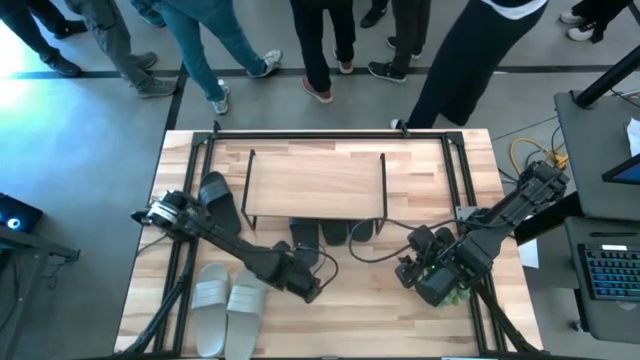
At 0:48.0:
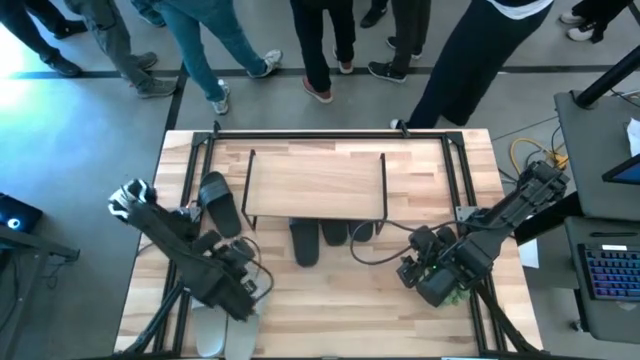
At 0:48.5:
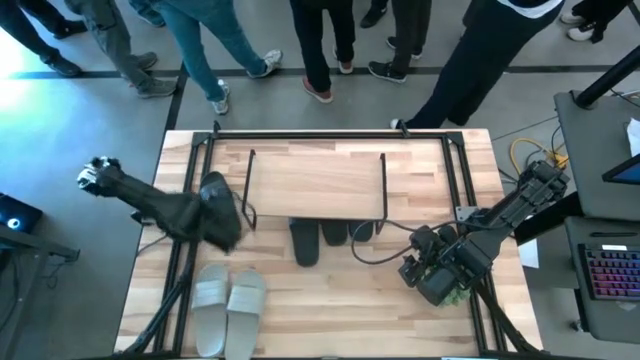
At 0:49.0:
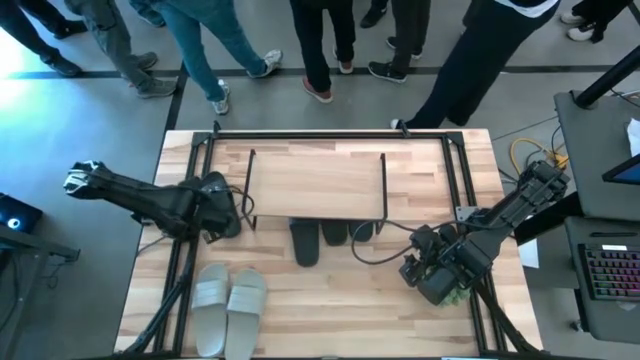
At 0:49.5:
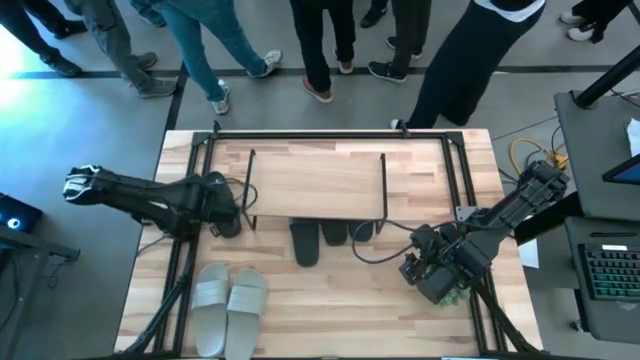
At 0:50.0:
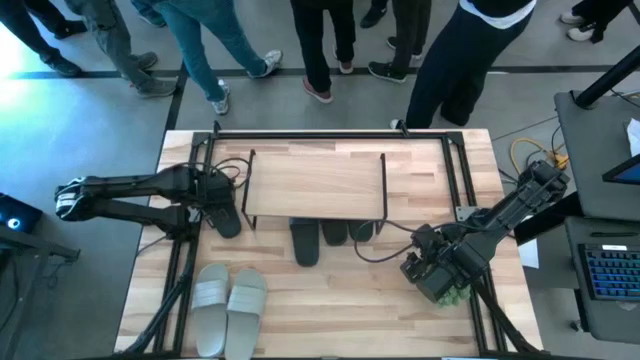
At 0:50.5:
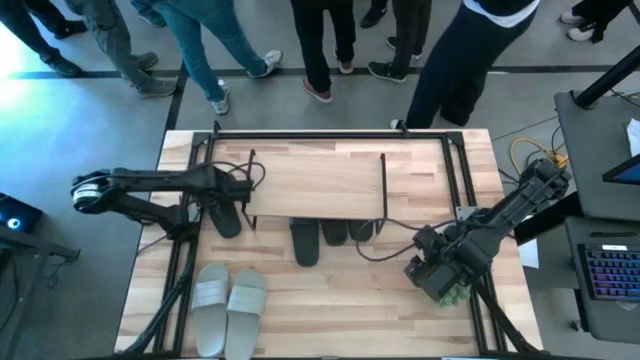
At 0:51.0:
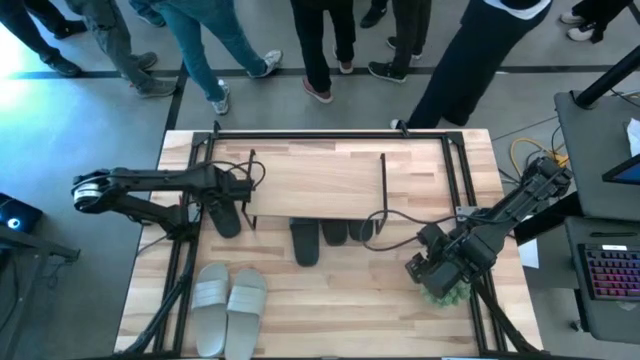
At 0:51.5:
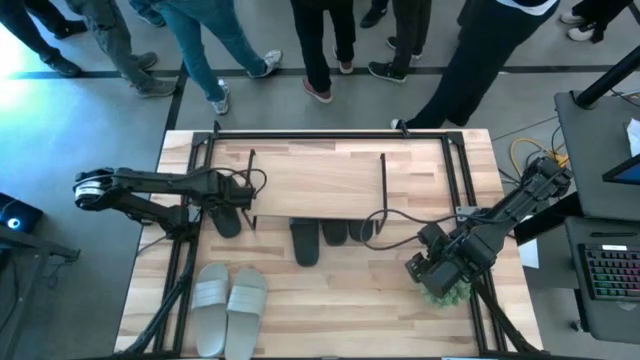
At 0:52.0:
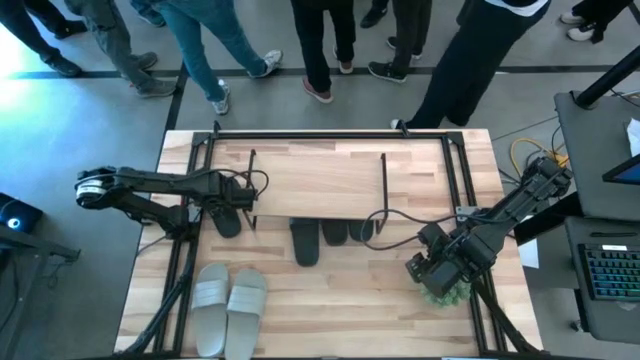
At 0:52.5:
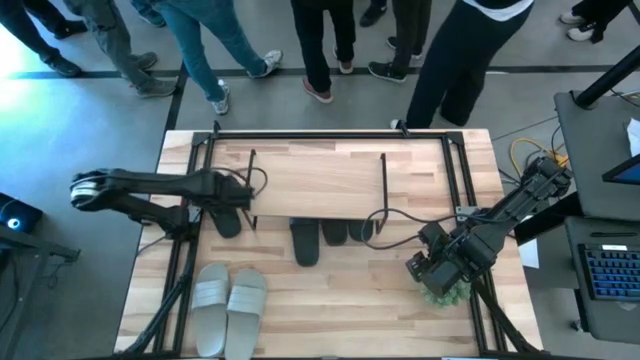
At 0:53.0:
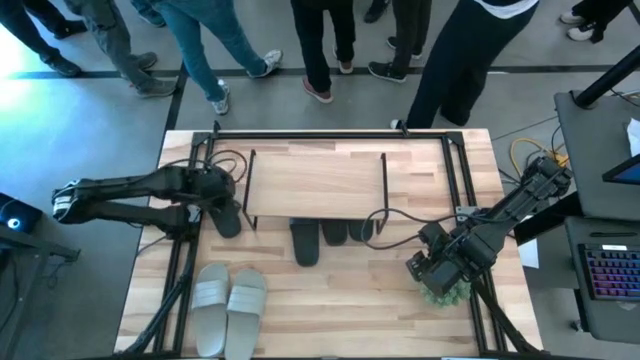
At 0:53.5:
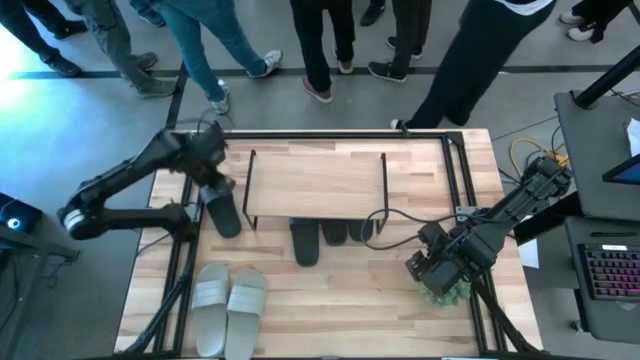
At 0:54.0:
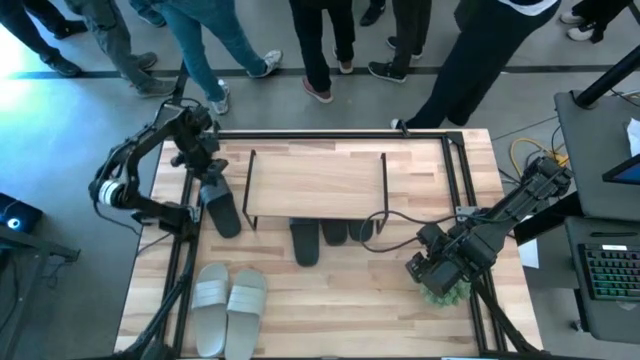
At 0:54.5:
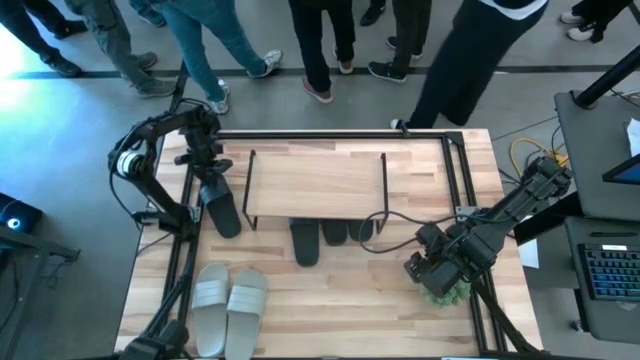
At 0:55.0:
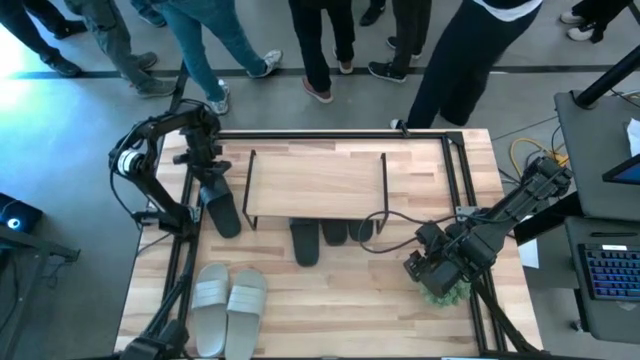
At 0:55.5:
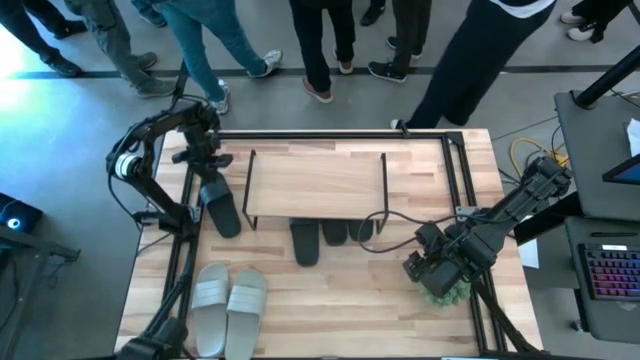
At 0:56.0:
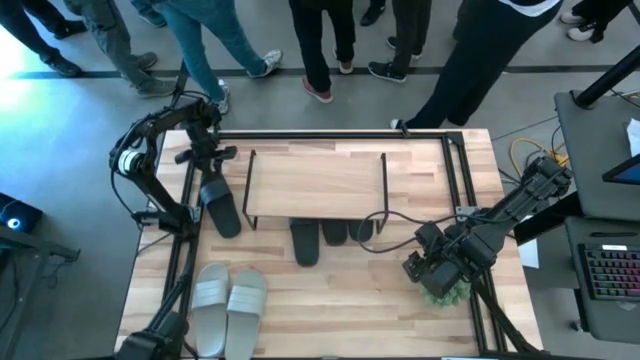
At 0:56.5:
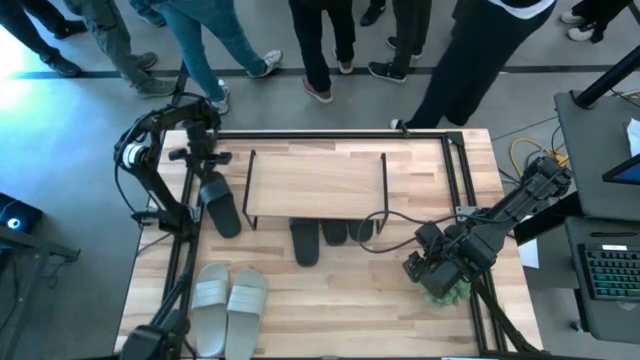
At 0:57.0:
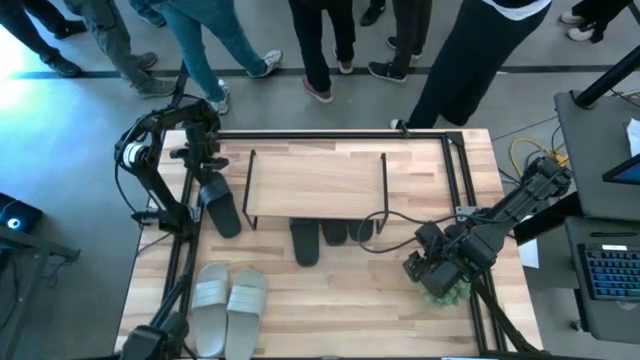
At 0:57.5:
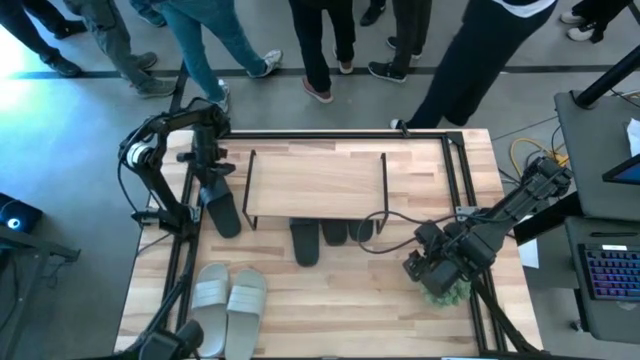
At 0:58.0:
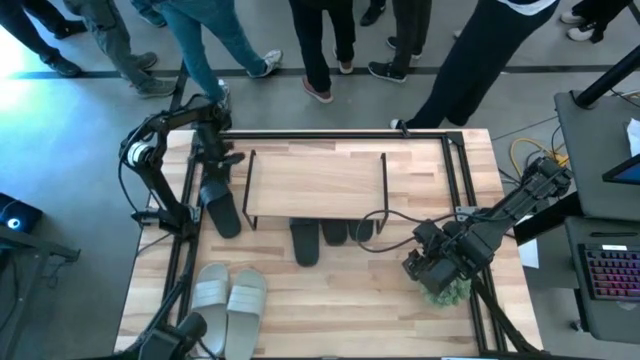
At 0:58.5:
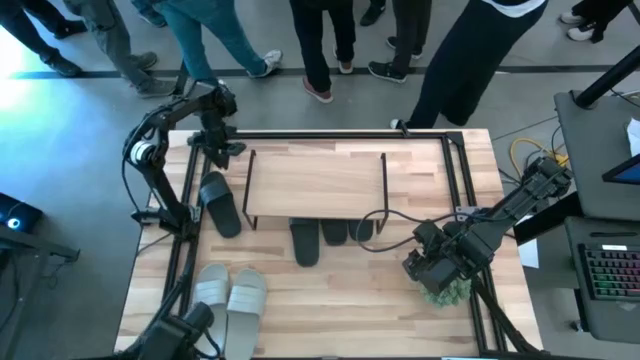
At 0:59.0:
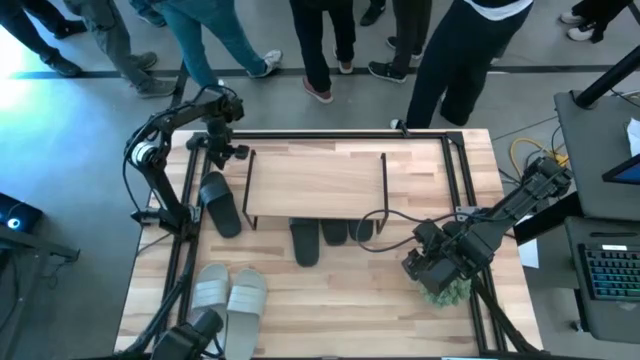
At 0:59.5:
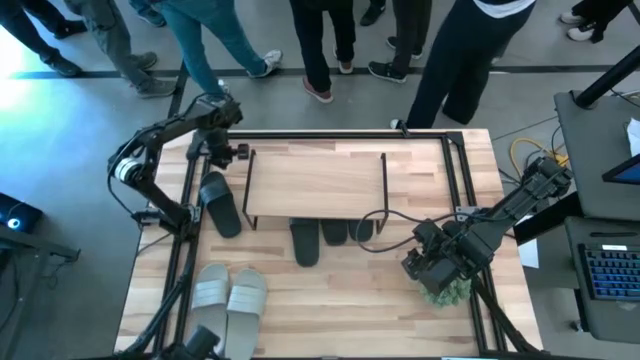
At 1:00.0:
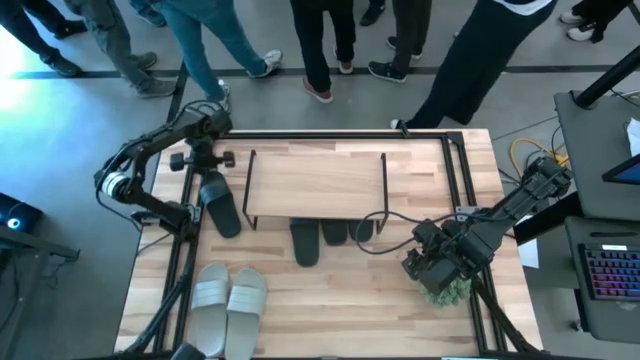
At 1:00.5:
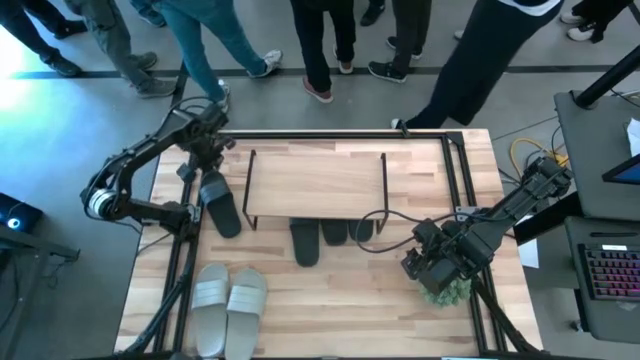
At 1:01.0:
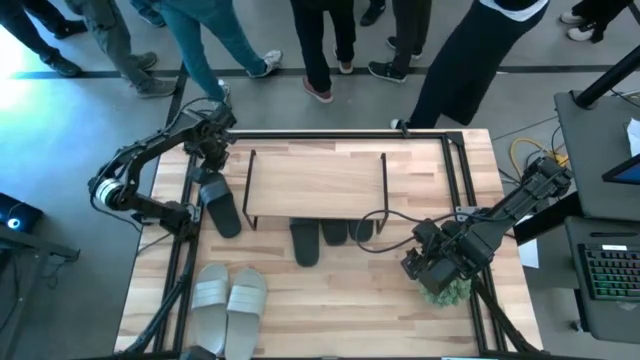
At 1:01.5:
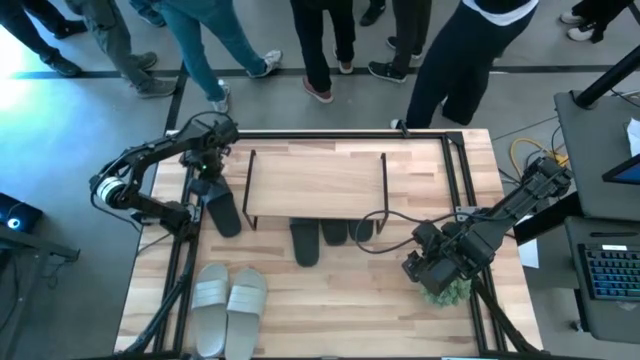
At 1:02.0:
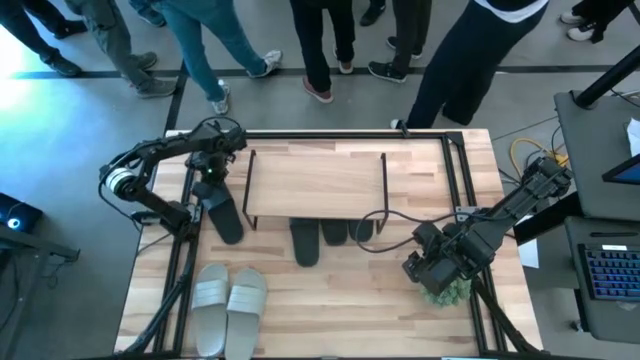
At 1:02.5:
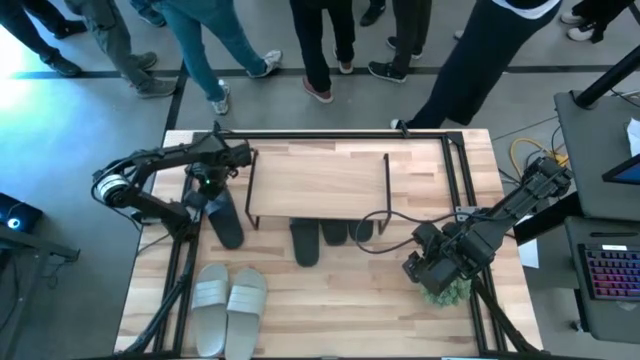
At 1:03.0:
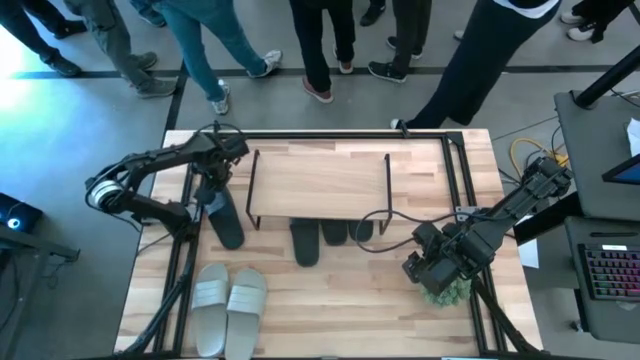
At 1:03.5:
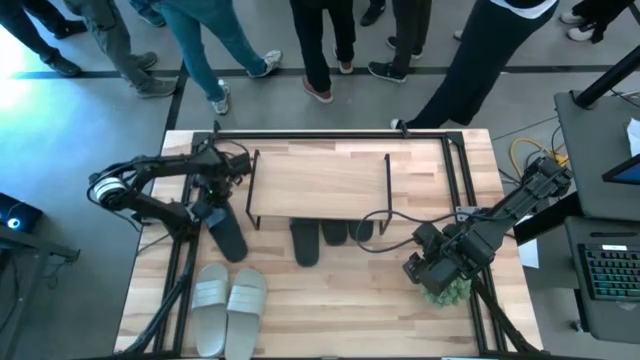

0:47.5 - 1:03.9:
Task: Pick and place slides into the shelf
Adjust the black slide
